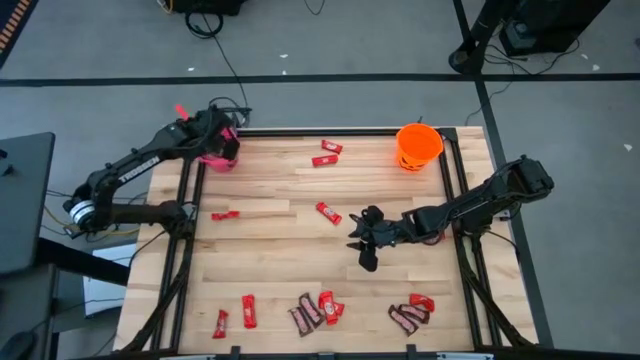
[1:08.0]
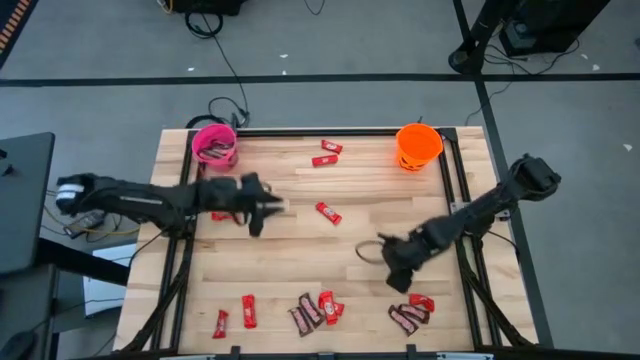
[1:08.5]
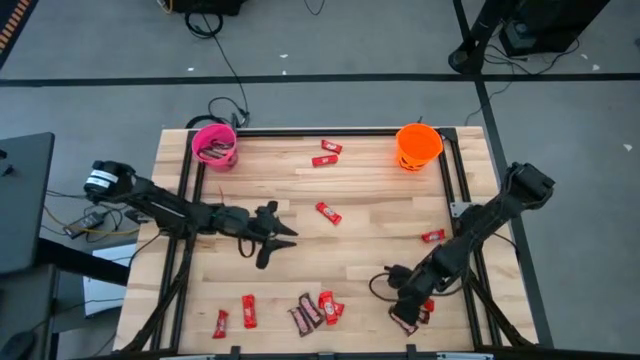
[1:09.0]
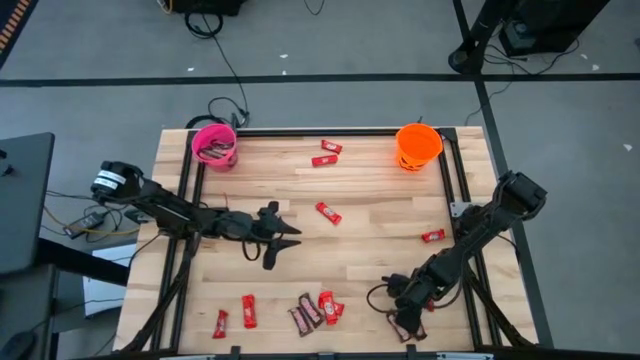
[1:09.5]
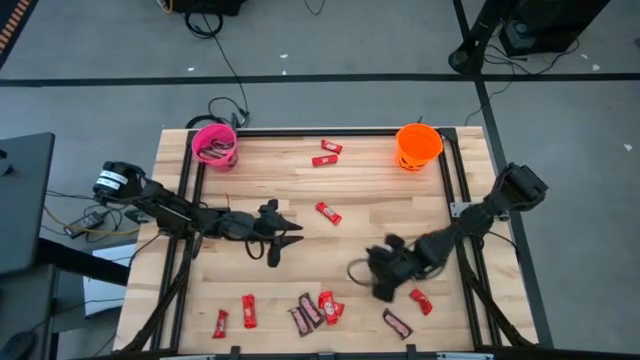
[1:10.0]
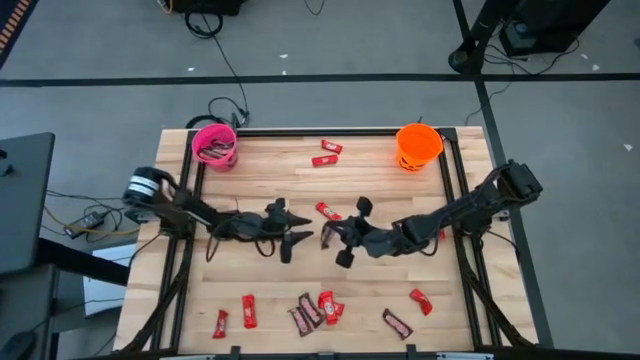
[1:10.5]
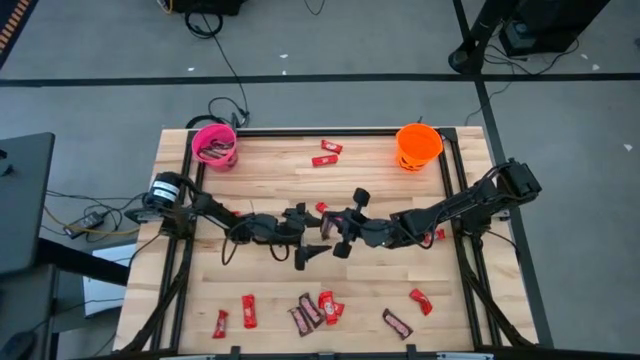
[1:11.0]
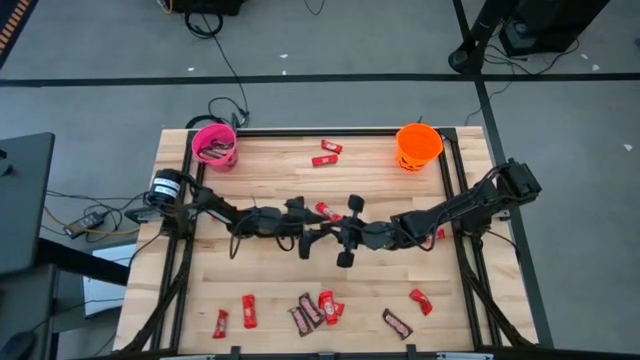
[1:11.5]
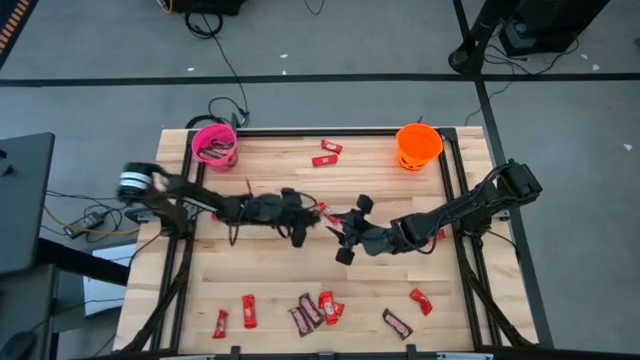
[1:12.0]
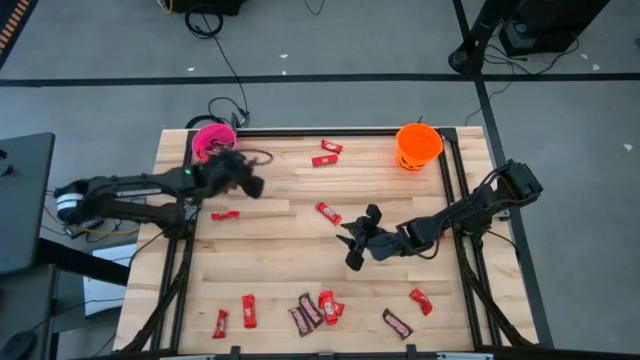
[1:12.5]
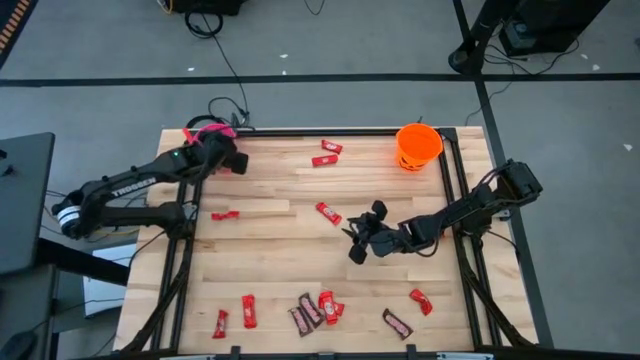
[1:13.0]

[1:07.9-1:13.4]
Task: Sort candy by brand, put in halloween buckets
Put the brown chocolate bar into the pink bucket

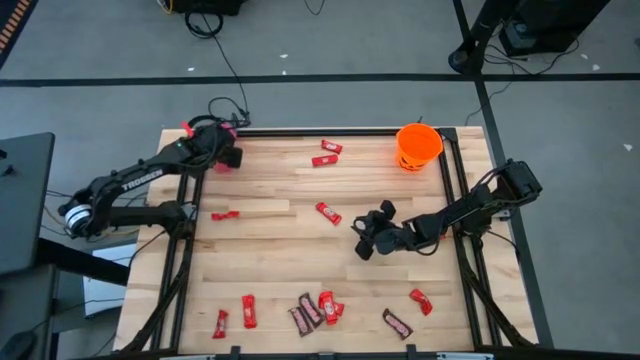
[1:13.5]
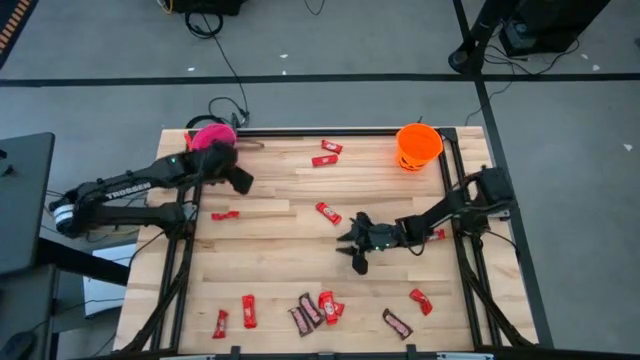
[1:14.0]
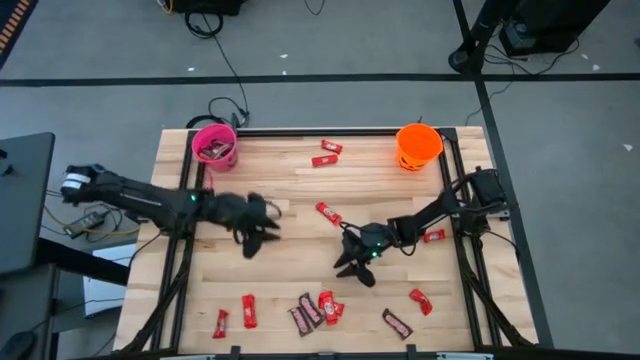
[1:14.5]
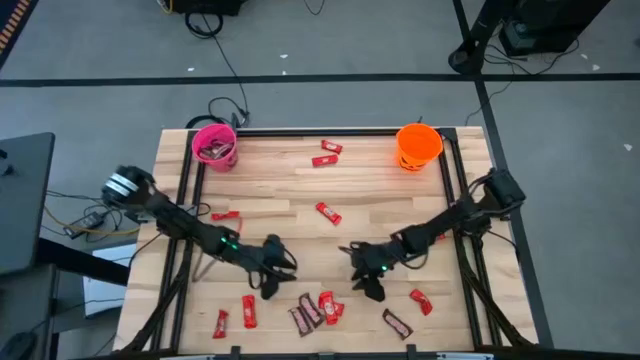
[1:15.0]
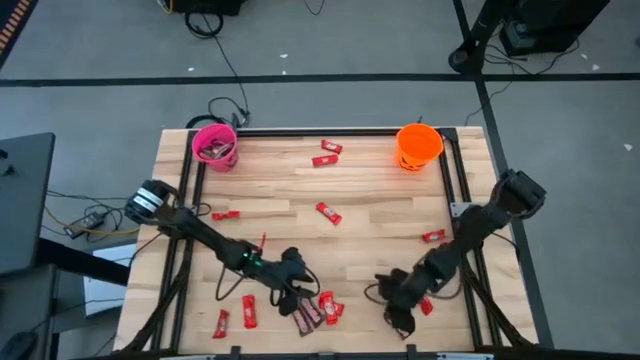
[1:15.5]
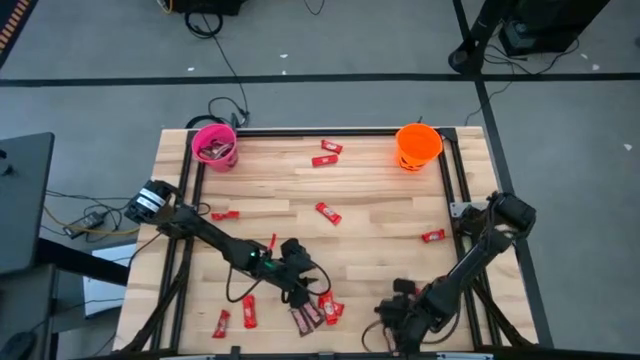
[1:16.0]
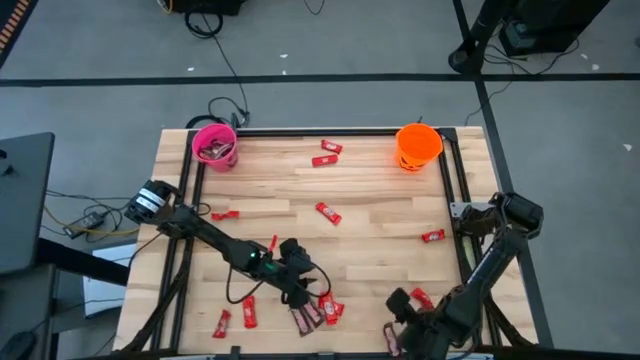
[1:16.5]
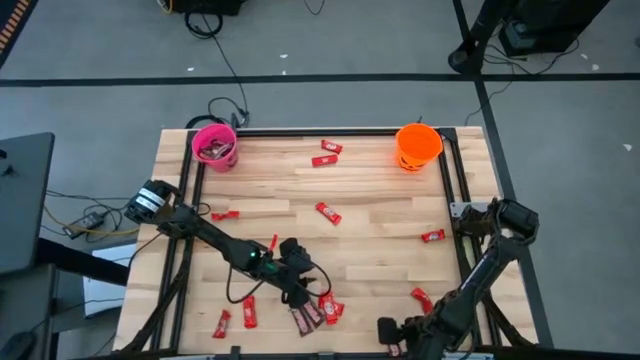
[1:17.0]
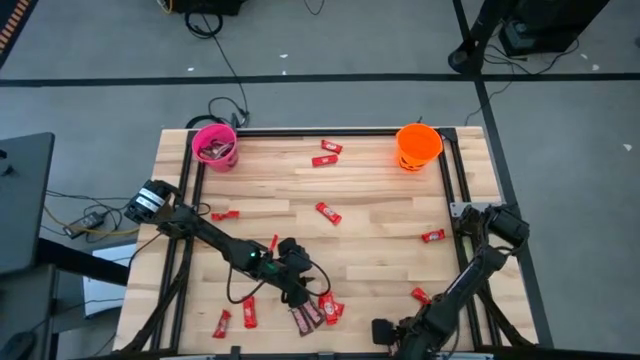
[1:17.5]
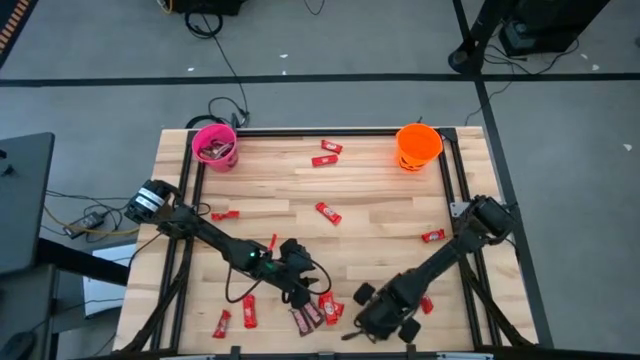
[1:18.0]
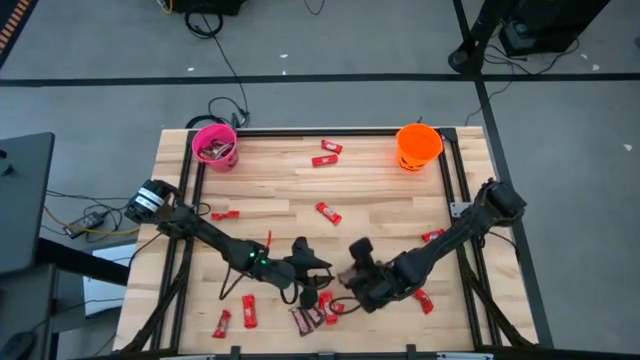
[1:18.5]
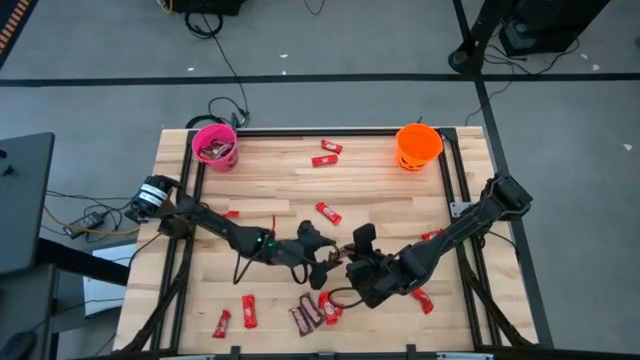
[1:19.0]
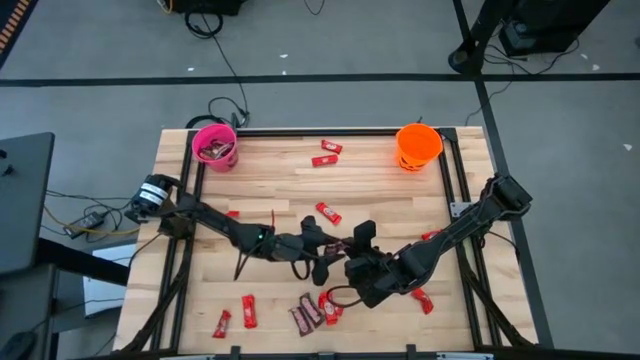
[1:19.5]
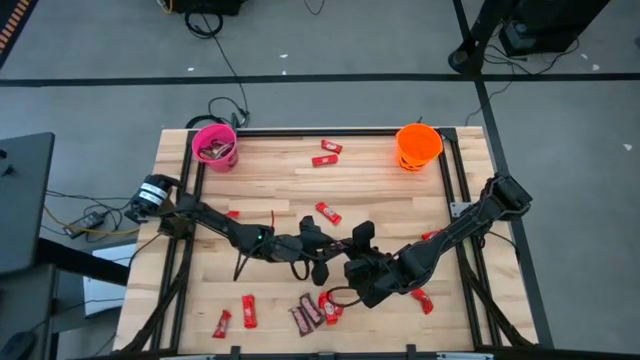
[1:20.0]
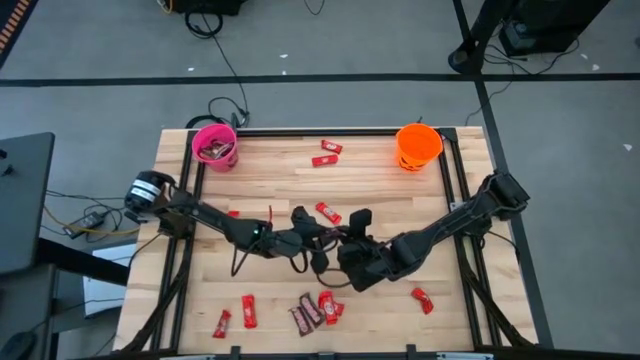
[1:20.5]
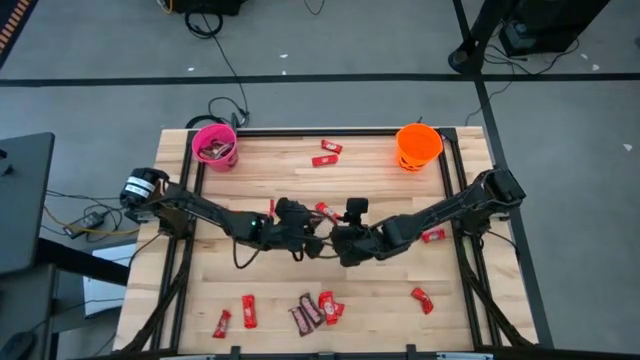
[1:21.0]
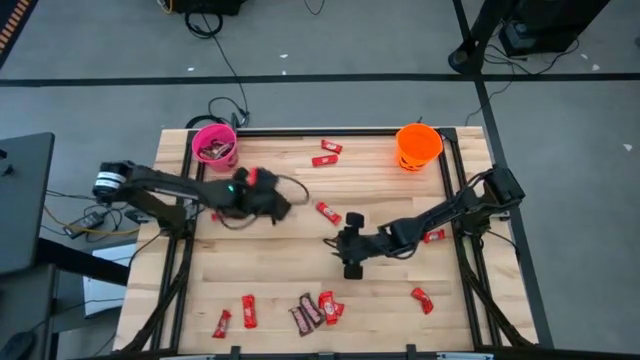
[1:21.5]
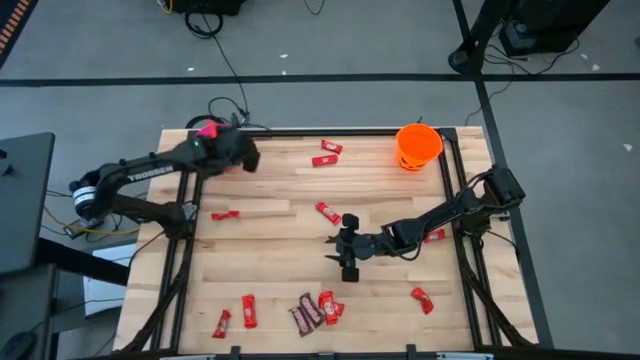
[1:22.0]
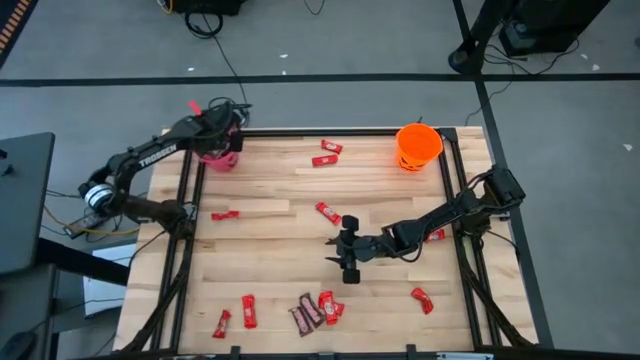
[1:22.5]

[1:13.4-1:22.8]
Put the right brown chocolate bar into the pink bucket

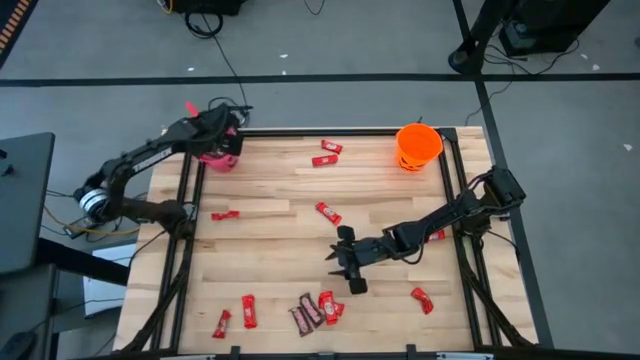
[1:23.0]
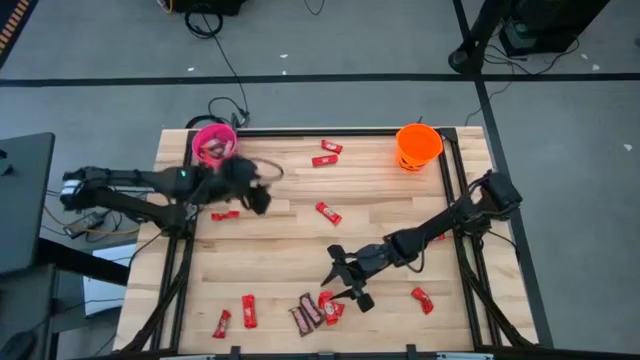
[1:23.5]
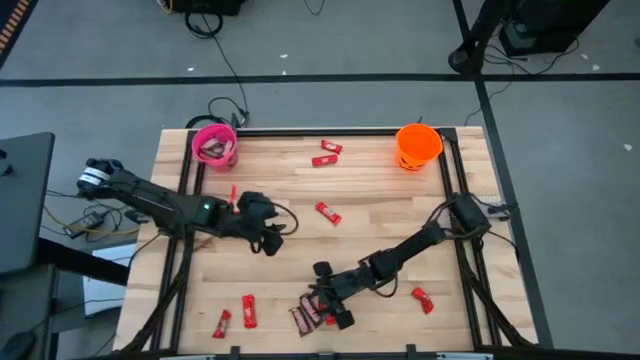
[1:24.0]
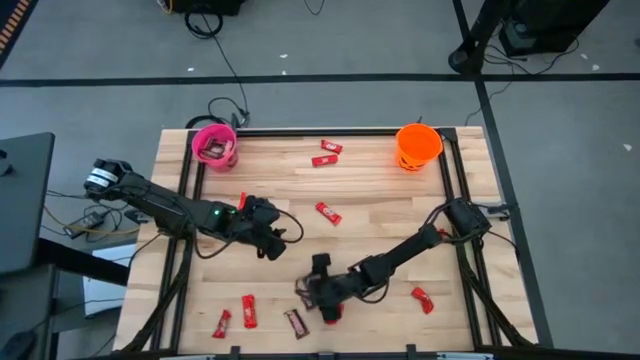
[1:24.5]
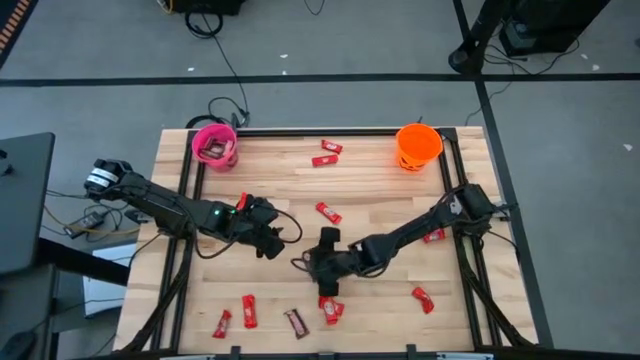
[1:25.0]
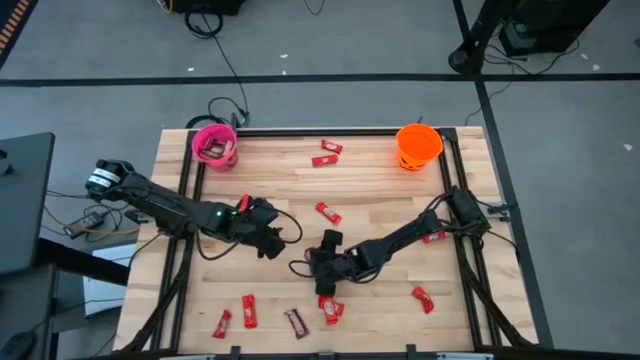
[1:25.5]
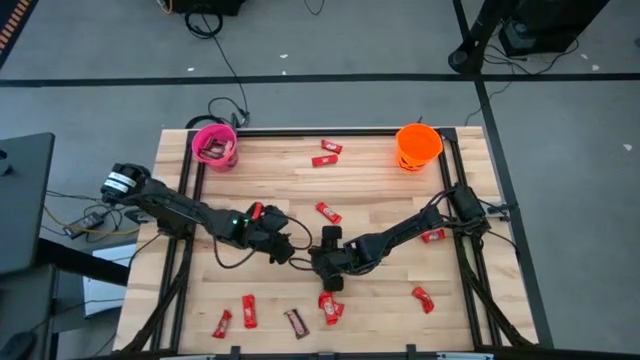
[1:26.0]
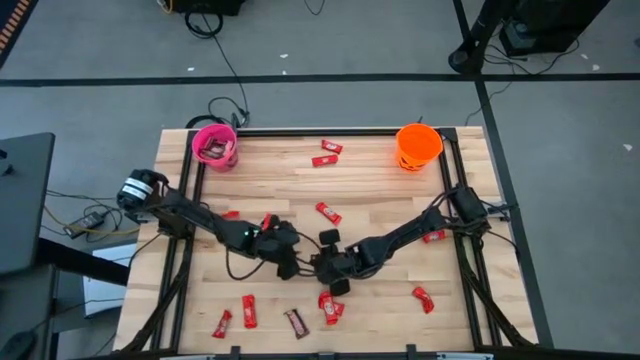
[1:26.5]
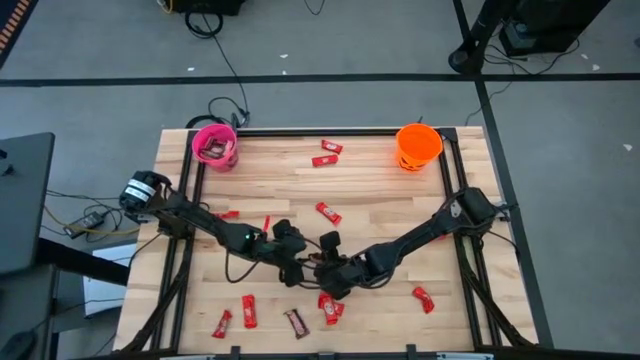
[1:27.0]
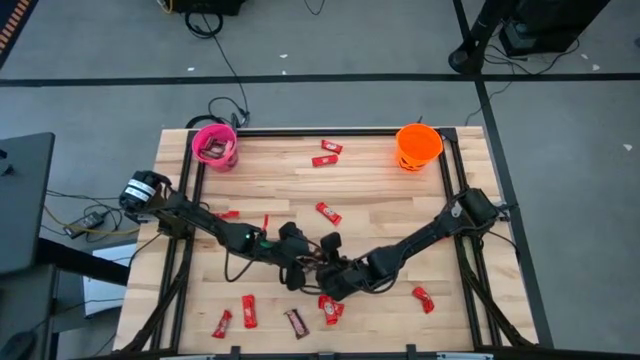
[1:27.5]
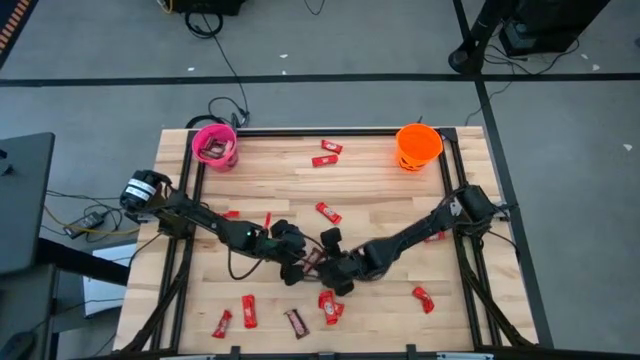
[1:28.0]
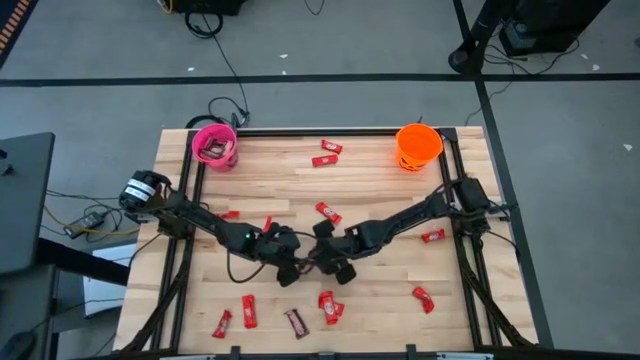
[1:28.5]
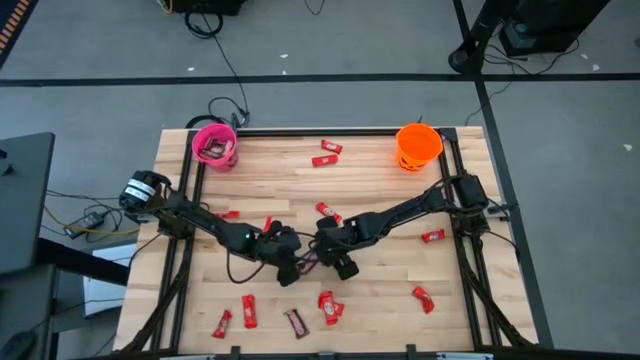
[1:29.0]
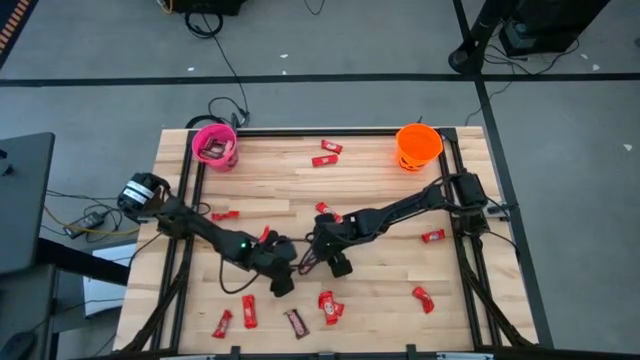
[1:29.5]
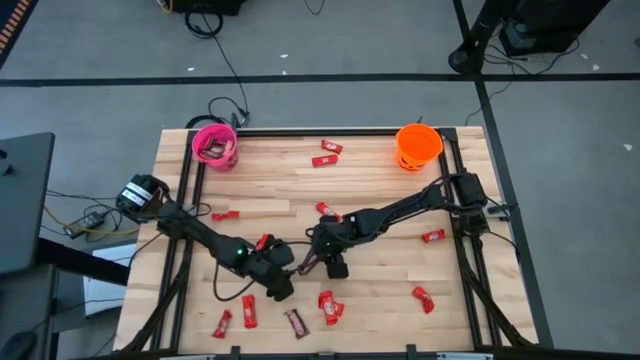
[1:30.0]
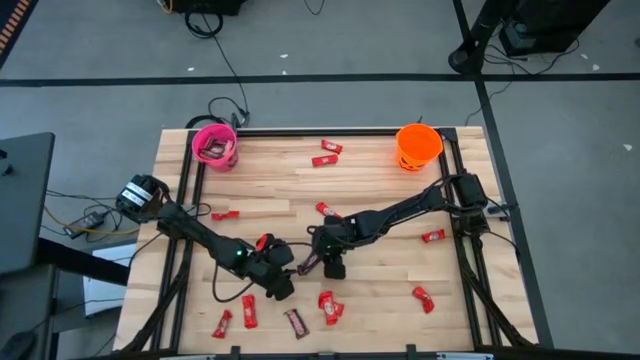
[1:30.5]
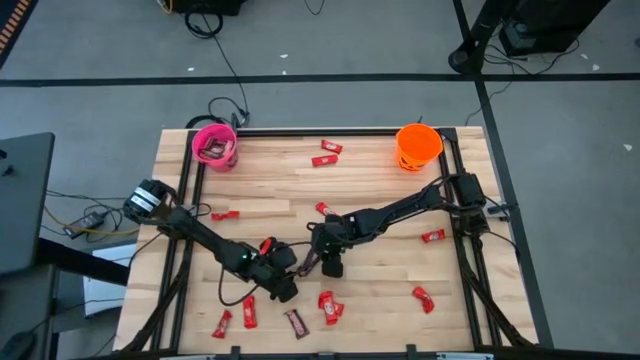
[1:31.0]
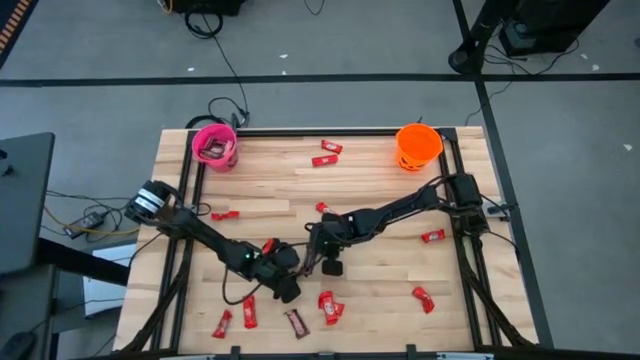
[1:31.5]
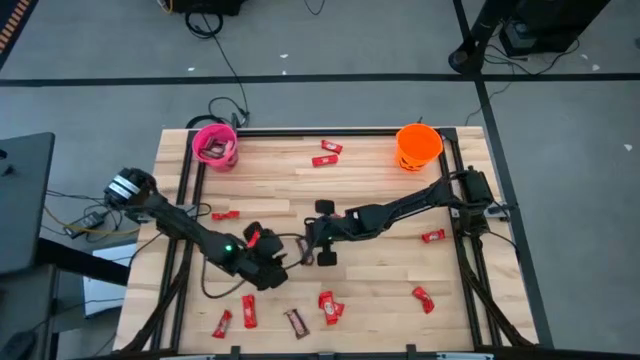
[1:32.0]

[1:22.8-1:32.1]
Put the right brown chocolate bar into the pink bucket
